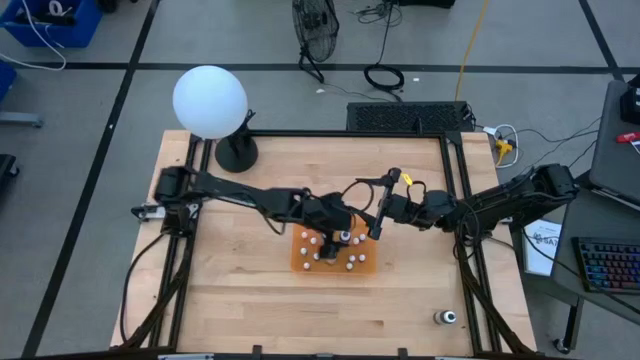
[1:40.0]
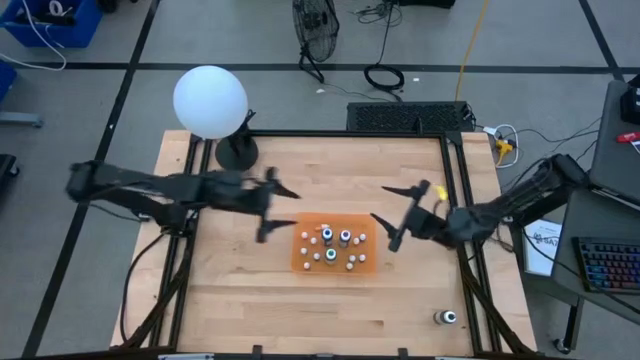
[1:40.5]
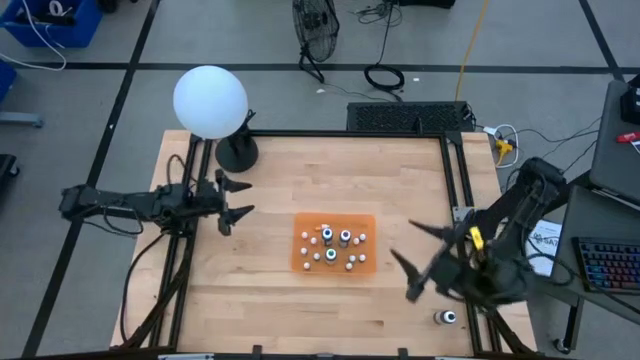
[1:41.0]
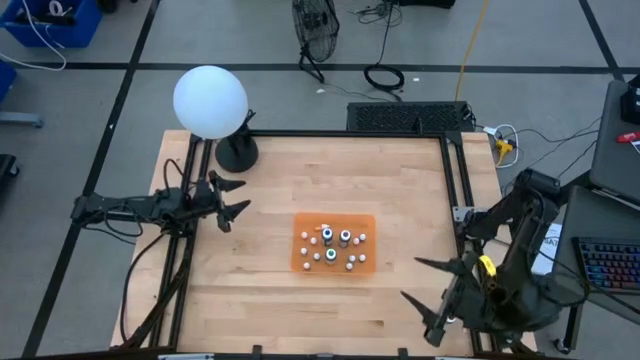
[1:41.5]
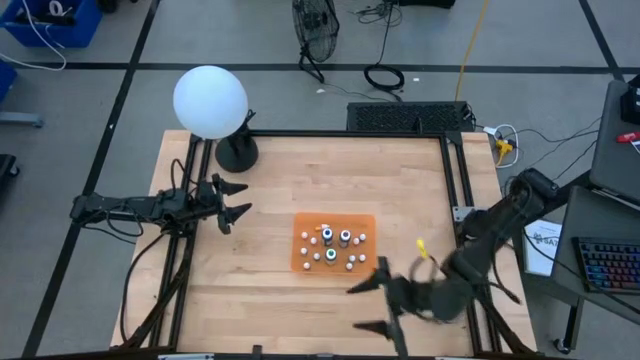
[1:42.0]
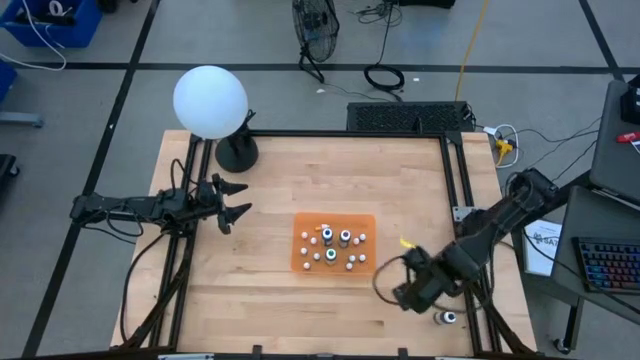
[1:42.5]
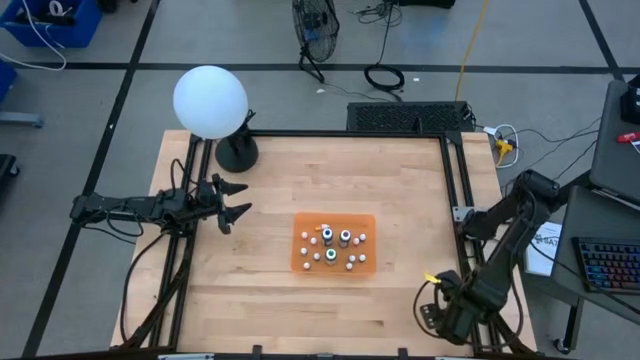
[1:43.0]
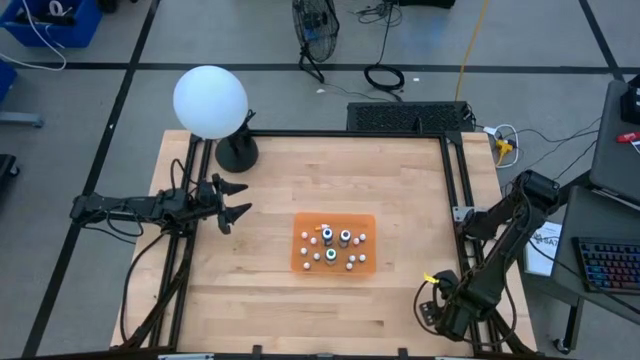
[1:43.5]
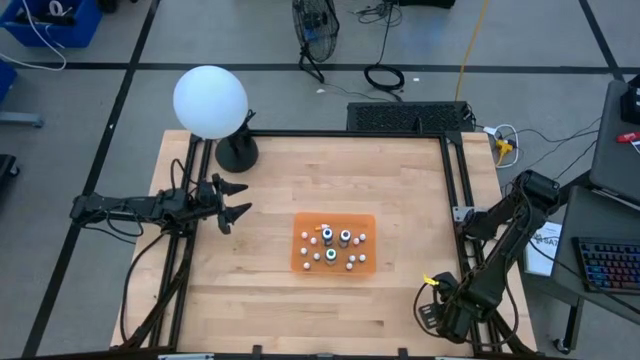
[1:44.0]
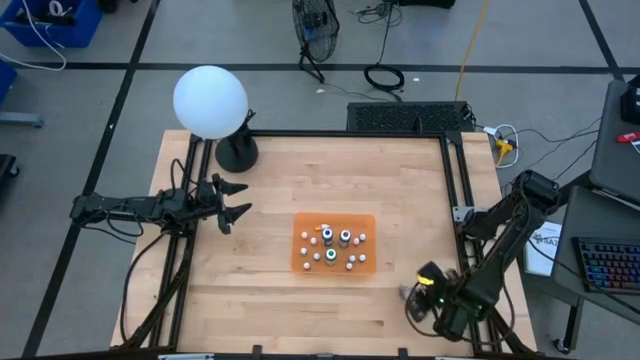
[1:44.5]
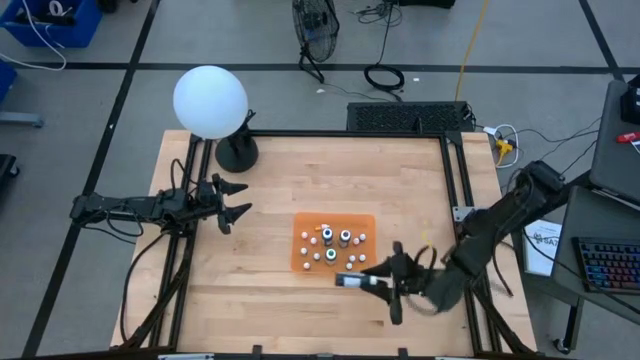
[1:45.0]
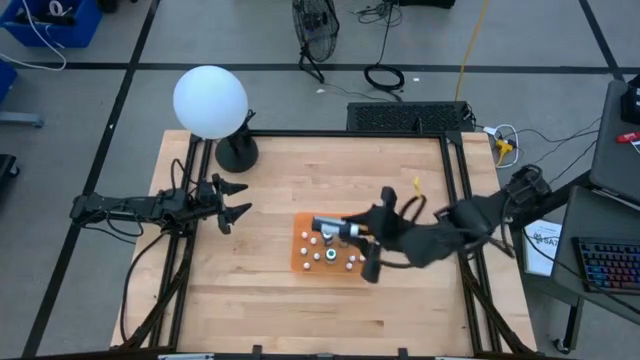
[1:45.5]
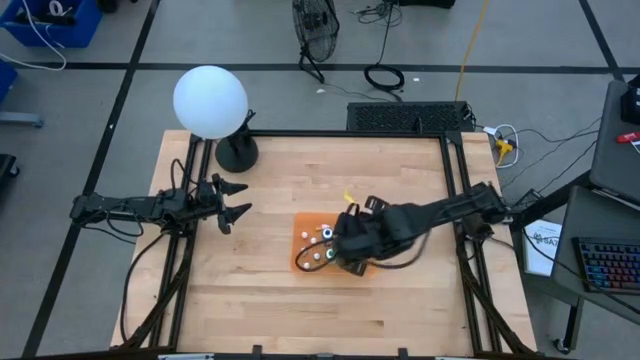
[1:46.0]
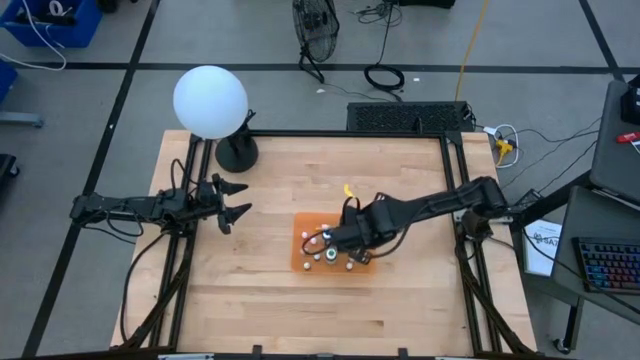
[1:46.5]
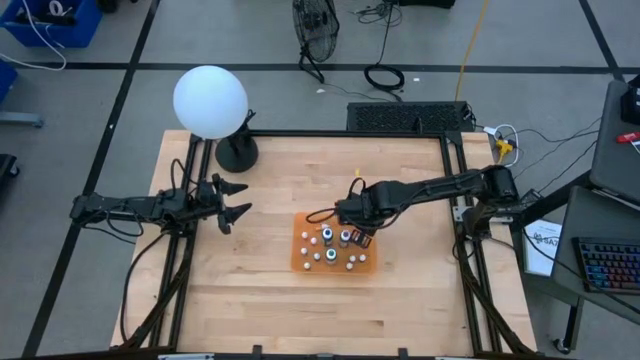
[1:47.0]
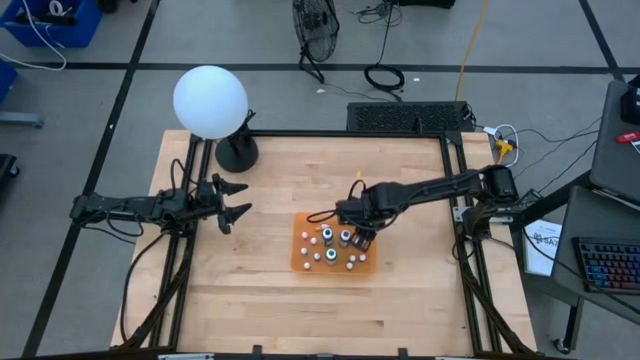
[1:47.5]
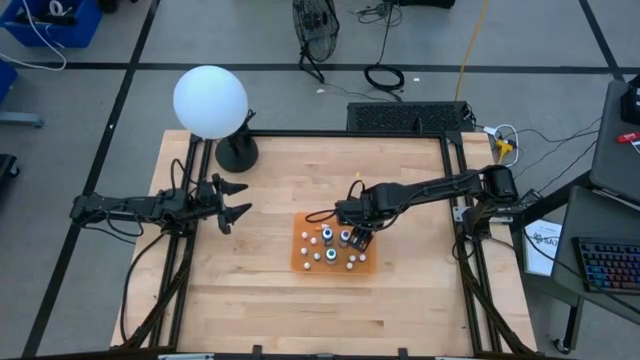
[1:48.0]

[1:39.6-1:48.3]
Task: Pick & Place food coloring
Put the large black food coloring bottle into the container

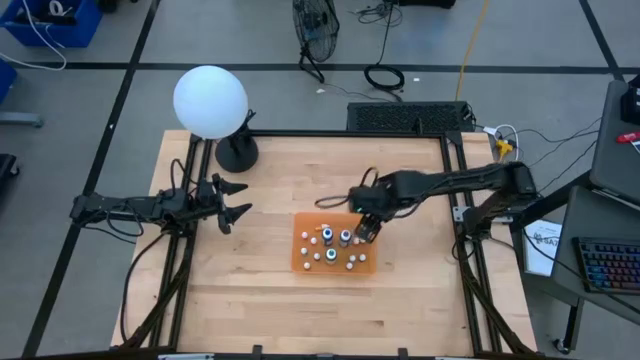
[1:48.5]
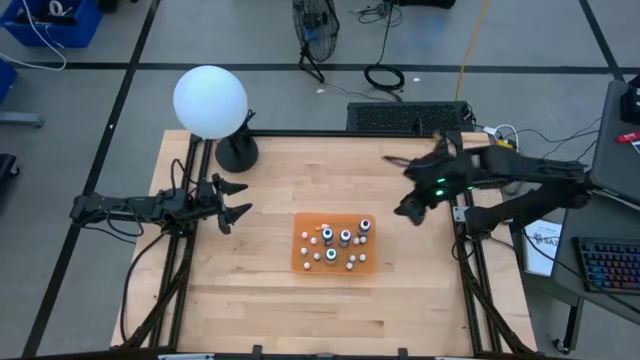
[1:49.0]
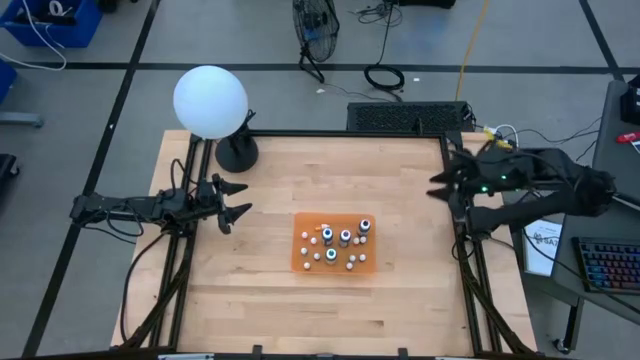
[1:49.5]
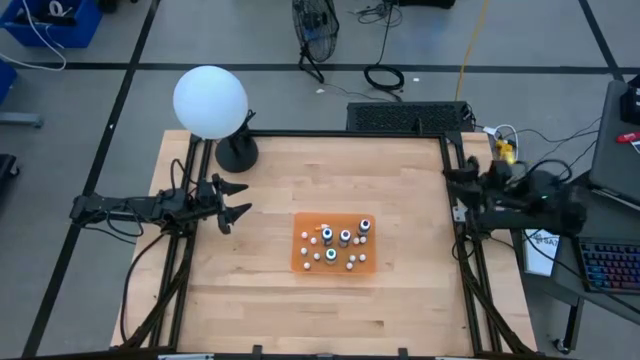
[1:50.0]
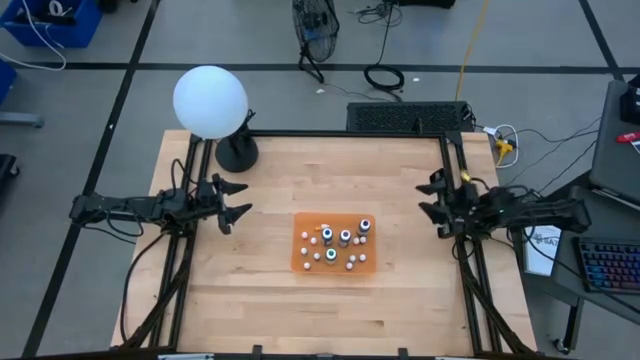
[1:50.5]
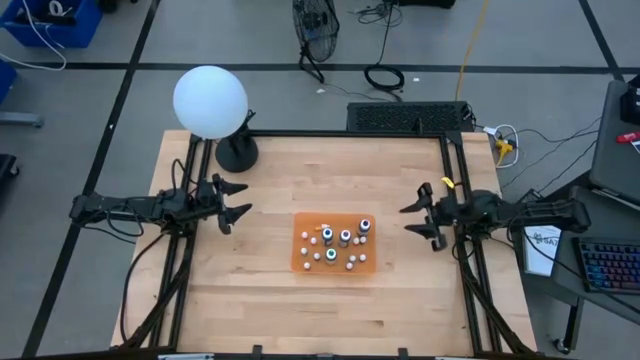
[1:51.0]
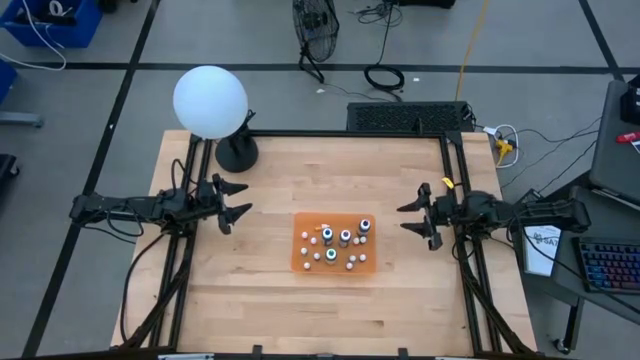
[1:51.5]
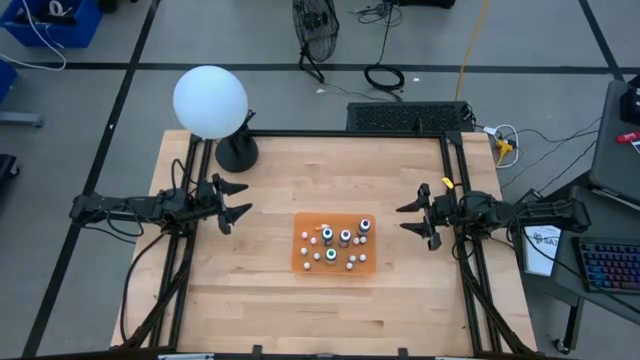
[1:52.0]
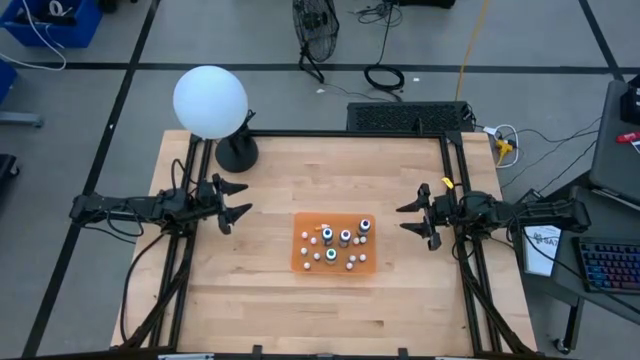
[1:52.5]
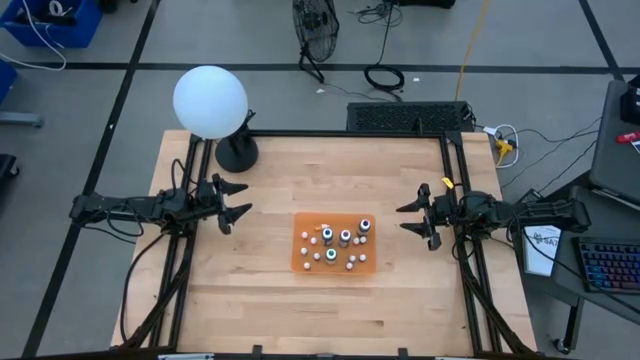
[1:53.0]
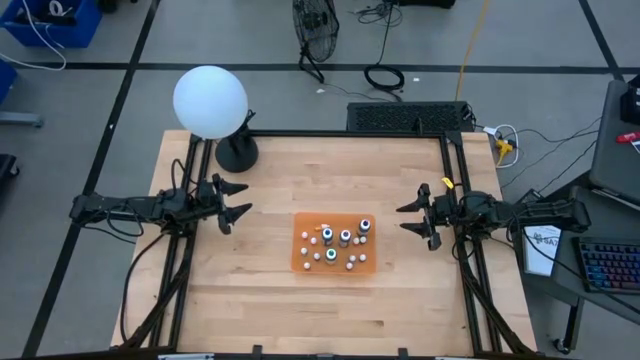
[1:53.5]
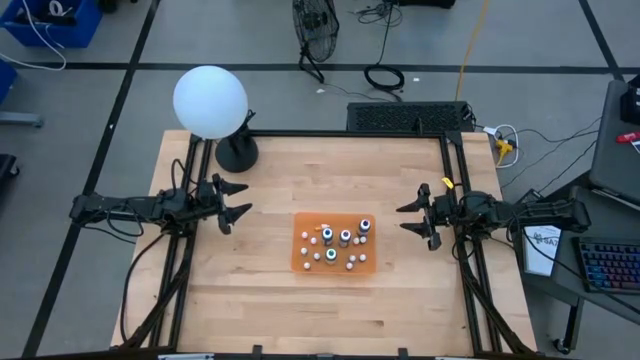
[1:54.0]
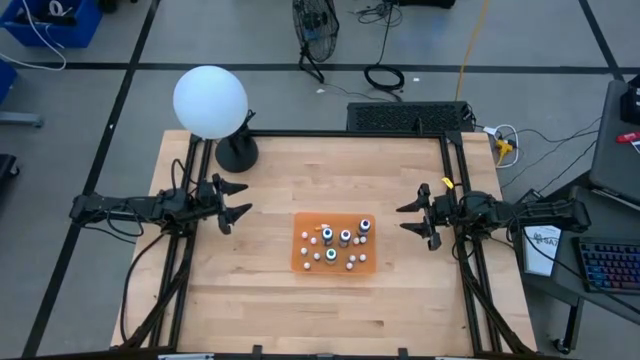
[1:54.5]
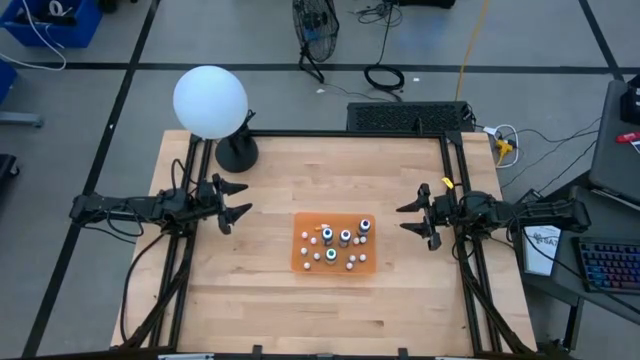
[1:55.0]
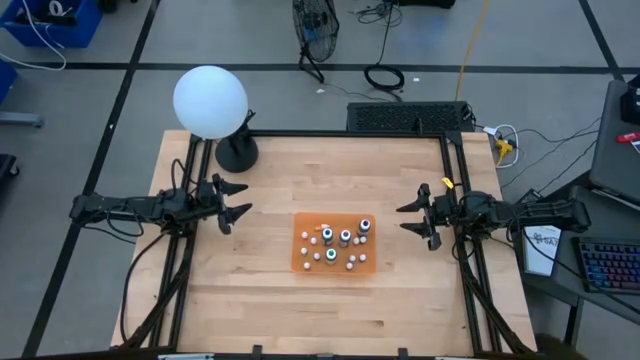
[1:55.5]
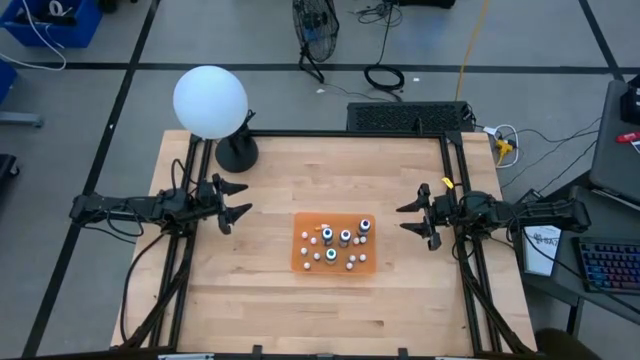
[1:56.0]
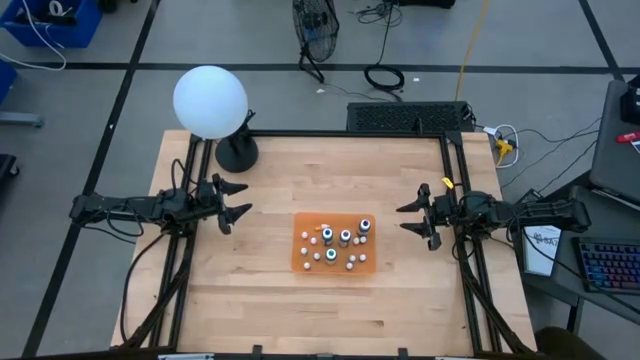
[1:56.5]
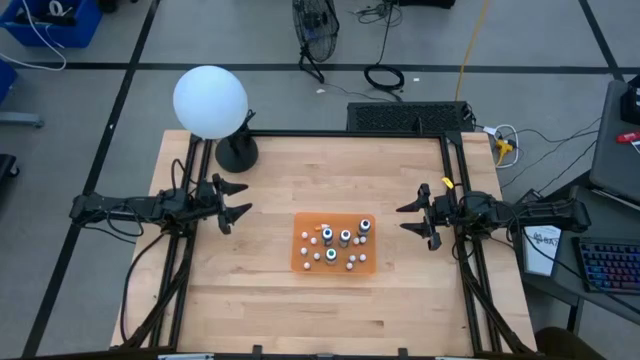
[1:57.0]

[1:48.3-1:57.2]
Return to Home Position

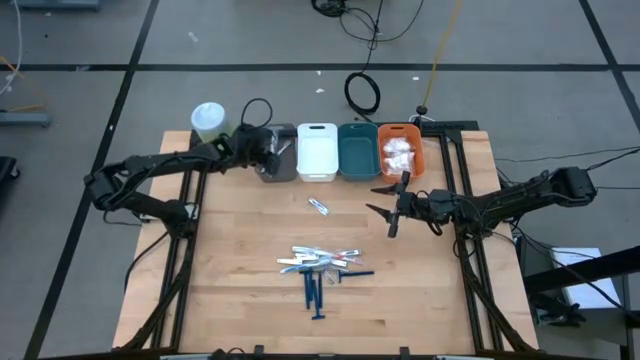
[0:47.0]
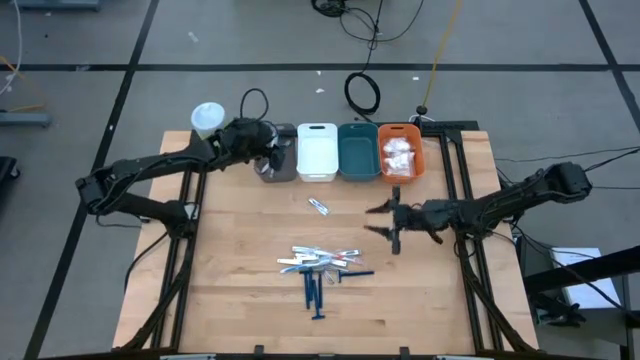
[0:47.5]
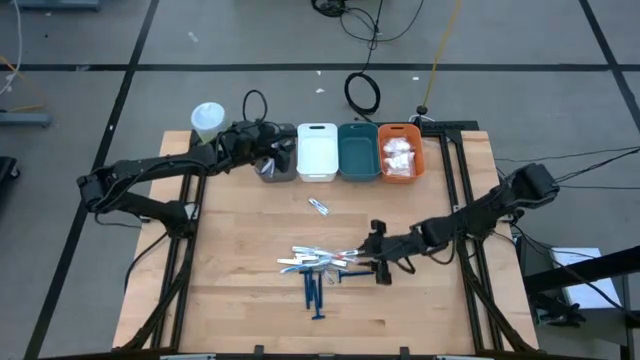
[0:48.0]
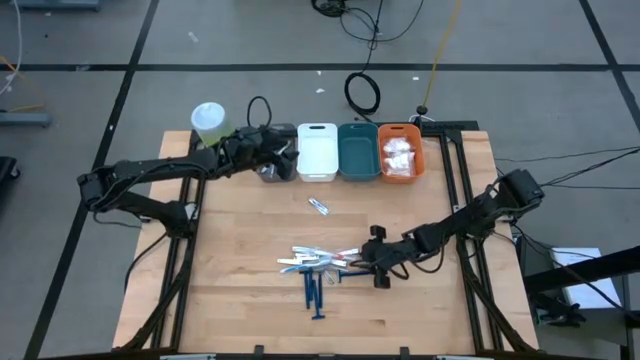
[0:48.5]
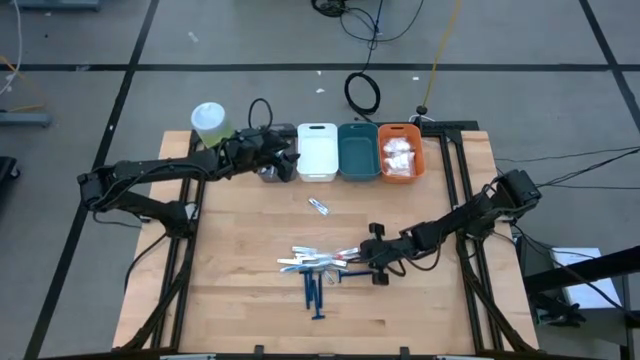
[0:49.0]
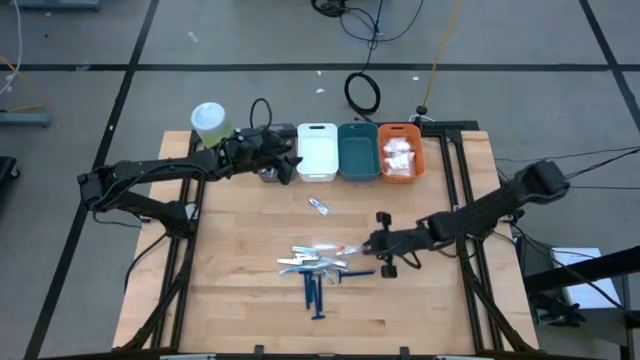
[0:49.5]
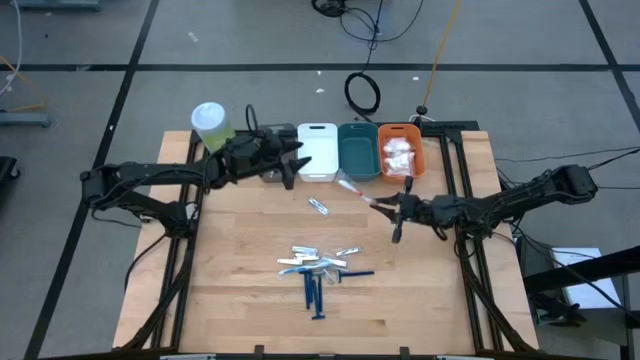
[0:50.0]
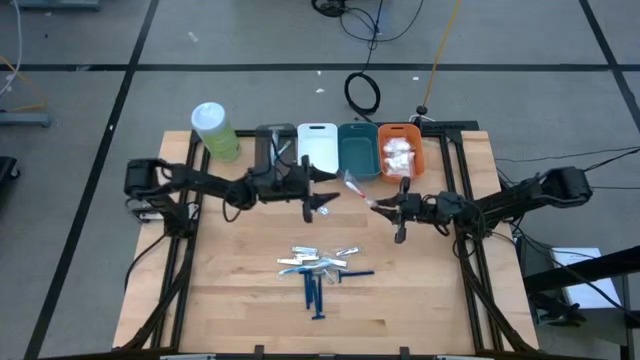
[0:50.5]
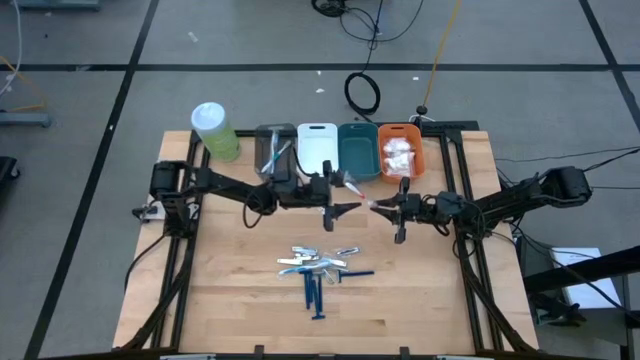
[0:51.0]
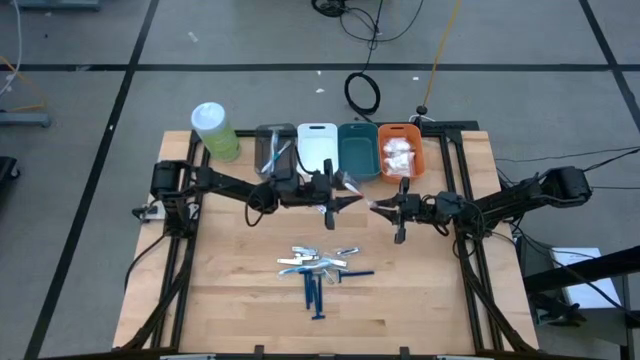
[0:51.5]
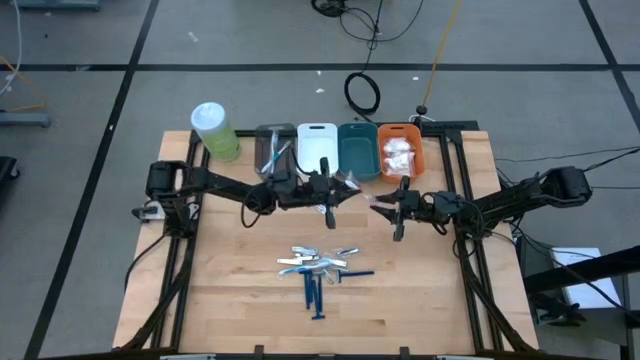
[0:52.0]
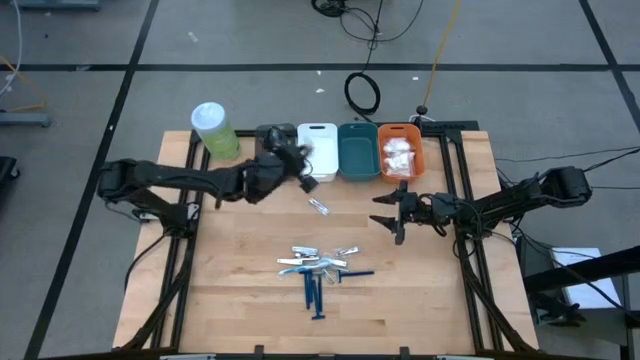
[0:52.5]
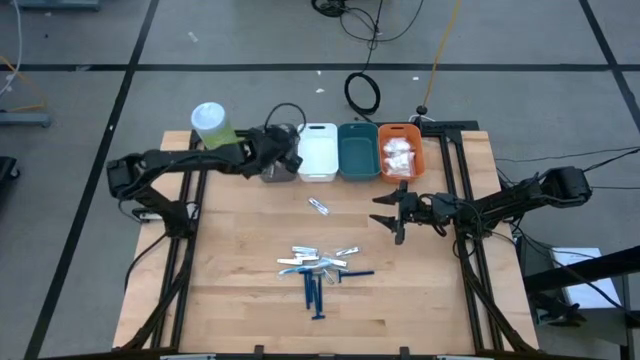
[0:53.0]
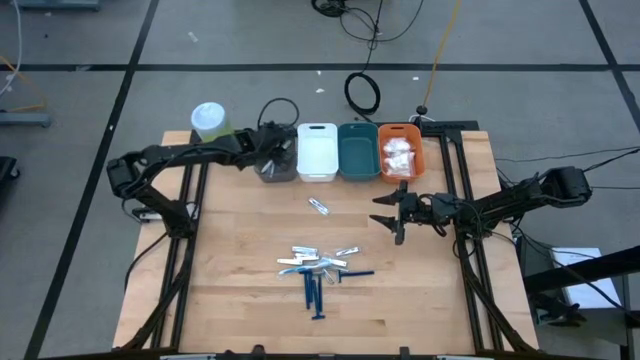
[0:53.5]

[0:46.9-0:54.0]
Task: Pick & Place Travel size toiletries
Put the red toothbrush into the black bin
